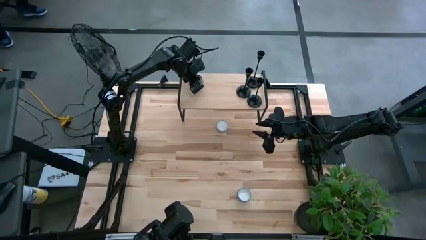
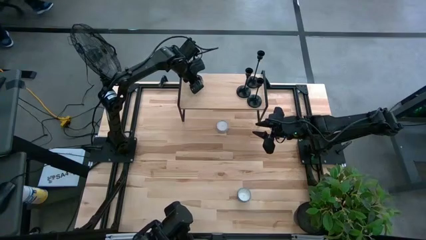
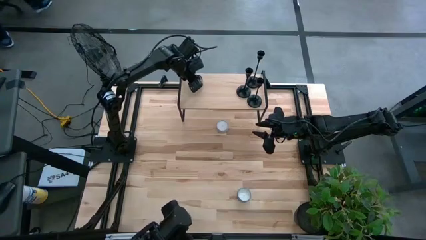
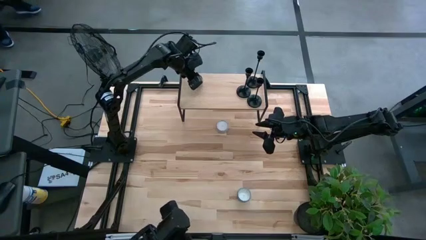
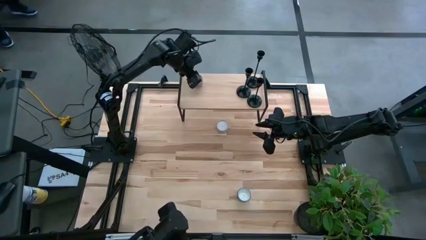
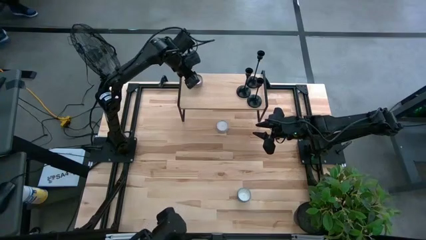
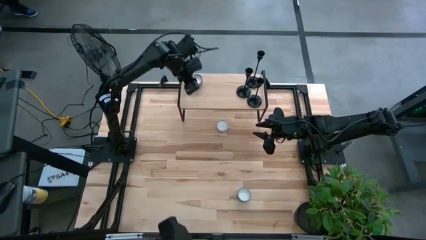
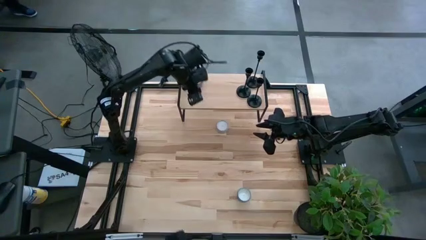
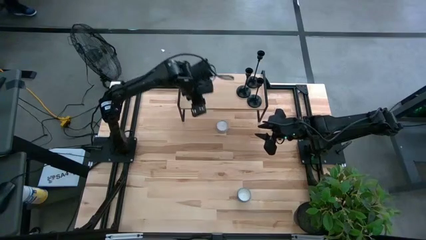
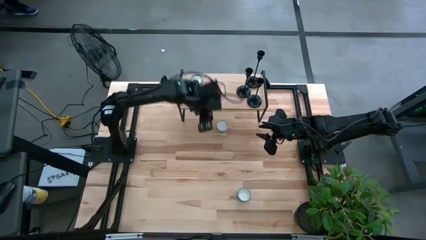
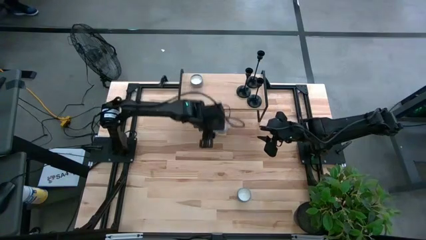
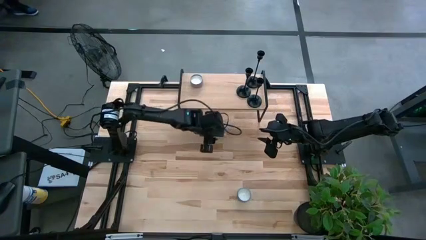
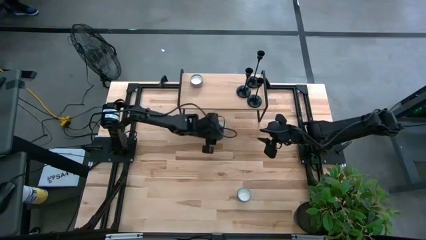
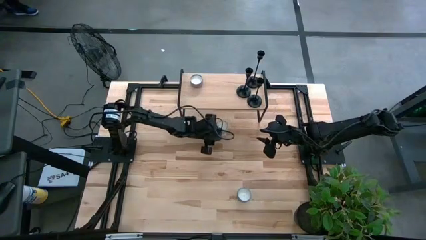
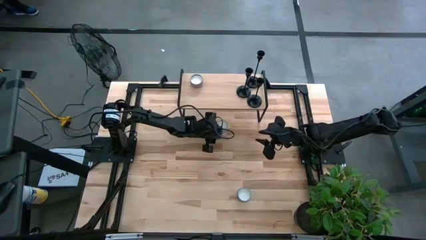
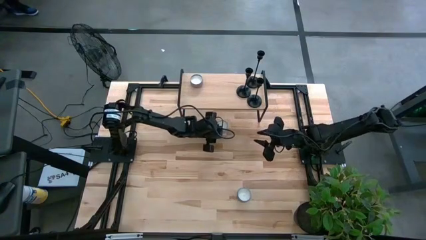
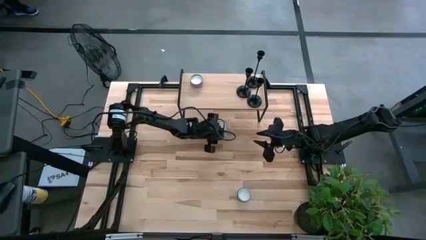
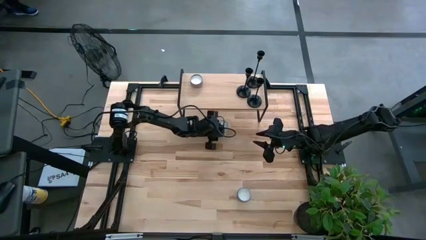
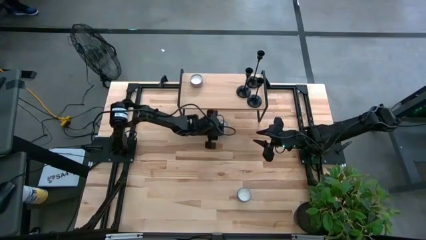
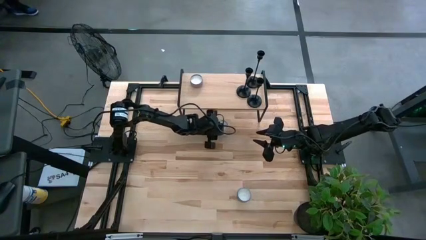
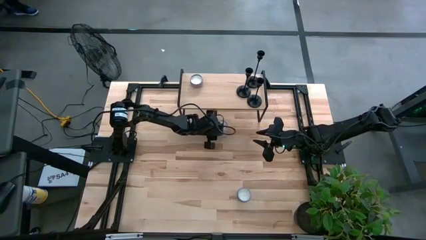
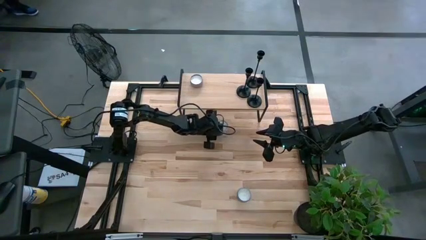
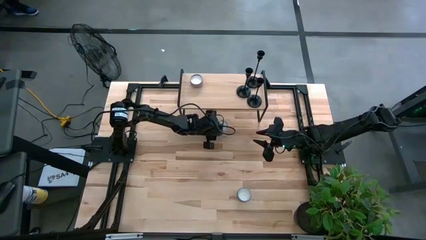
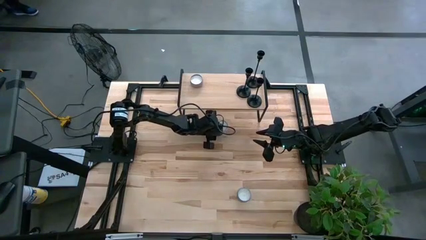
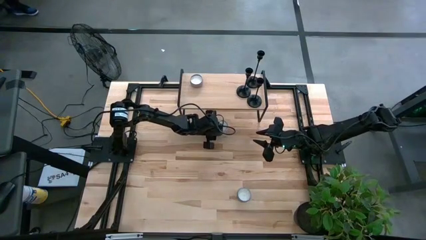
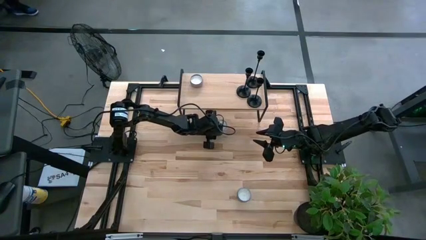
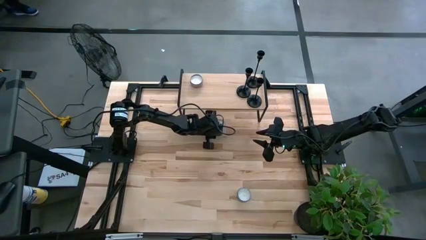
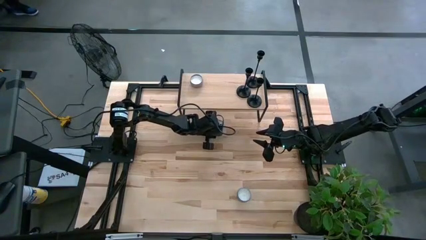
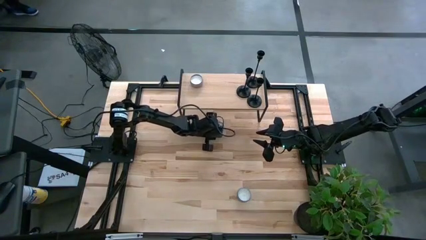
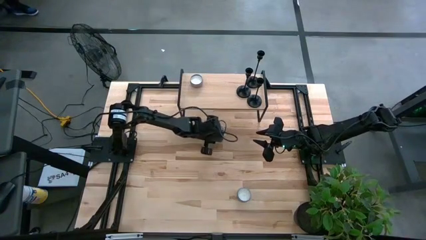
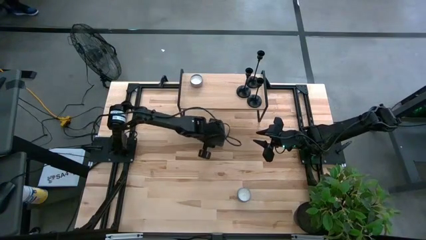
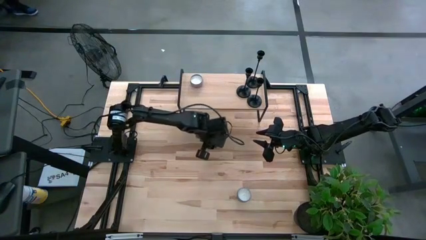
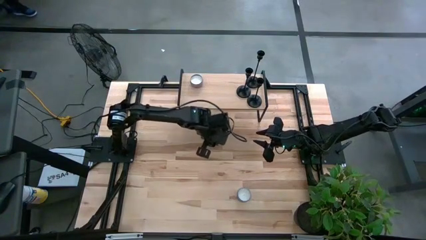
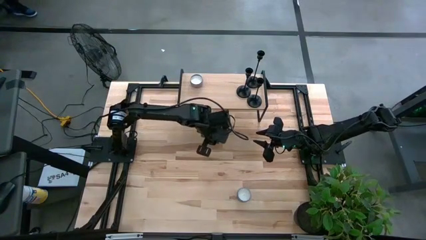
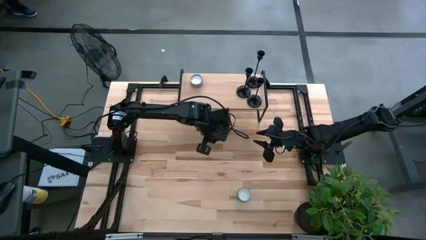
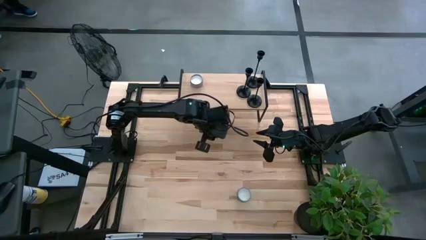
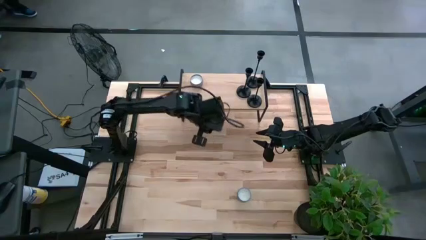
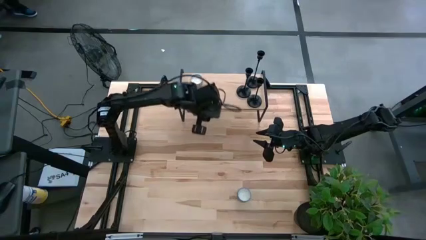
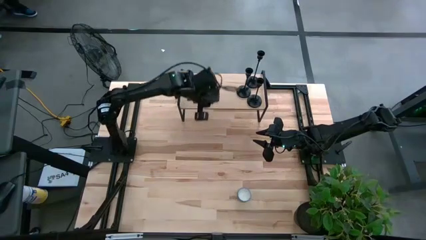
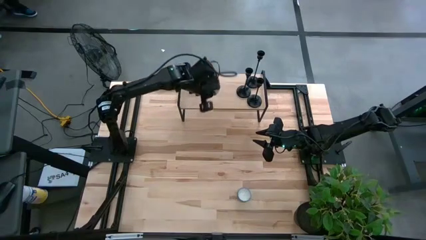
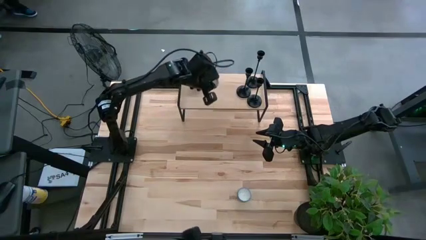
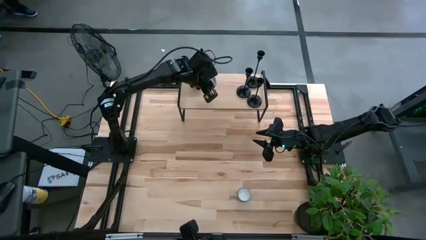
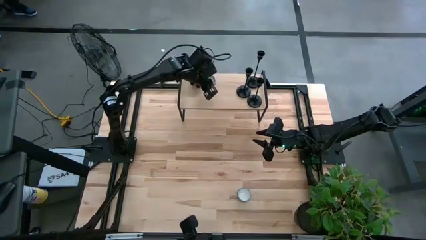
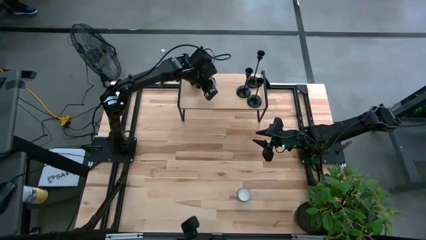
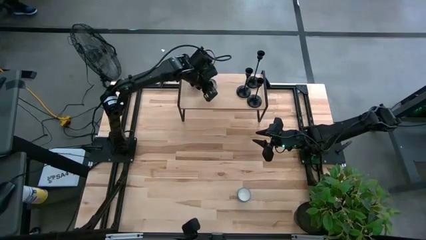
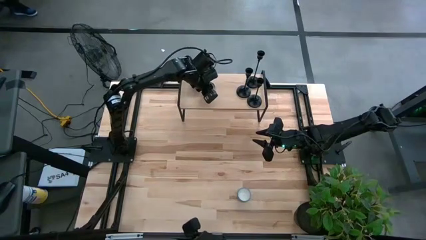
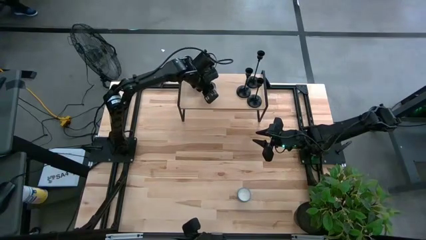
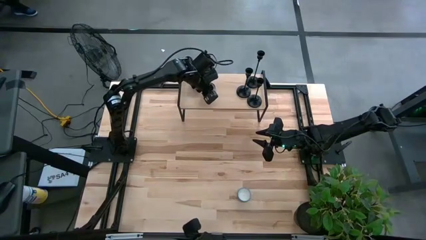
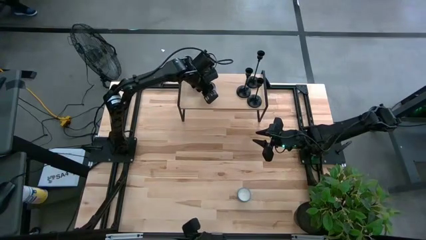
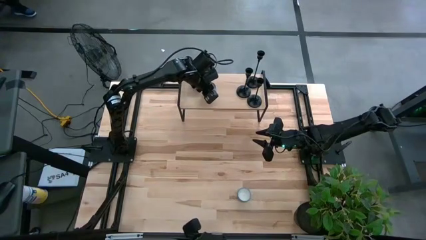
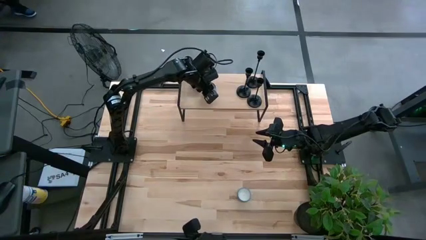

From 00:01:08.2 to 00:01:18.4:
Task: Pick & Place candle stick holders
Put the red scented candle on the shelf

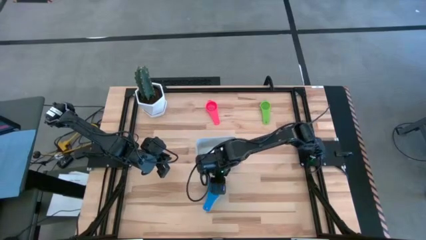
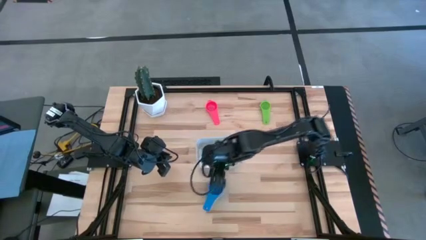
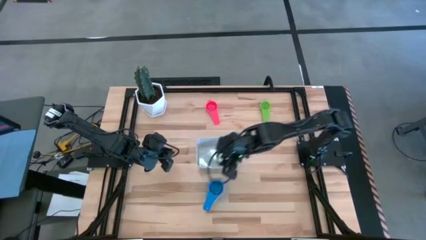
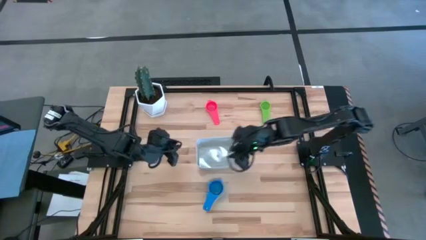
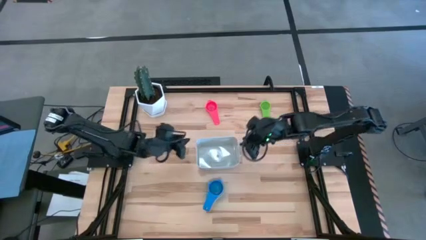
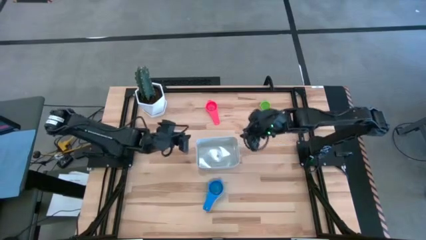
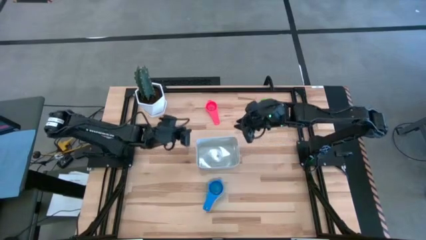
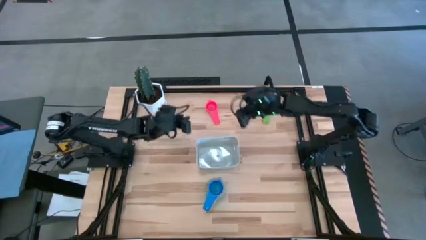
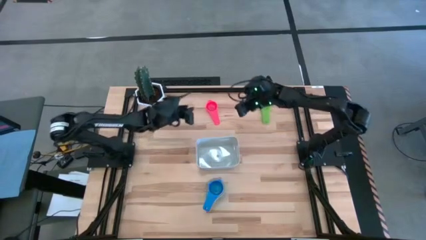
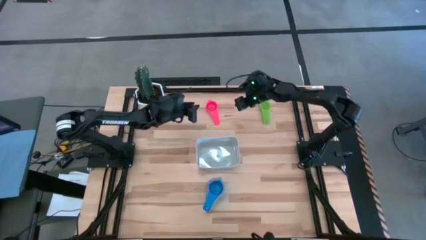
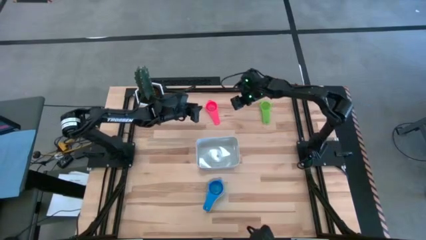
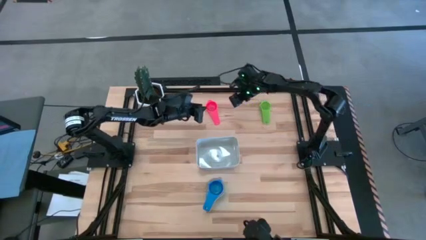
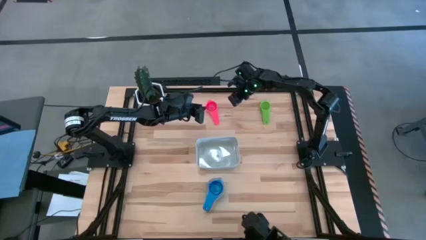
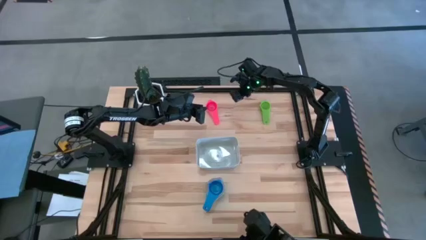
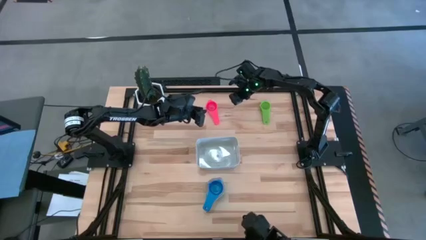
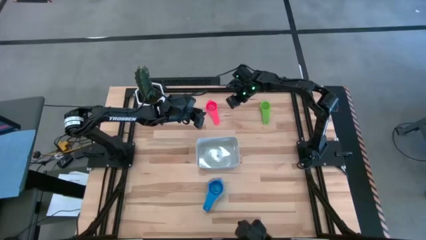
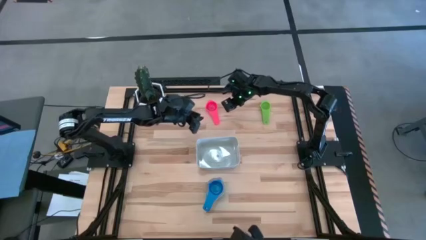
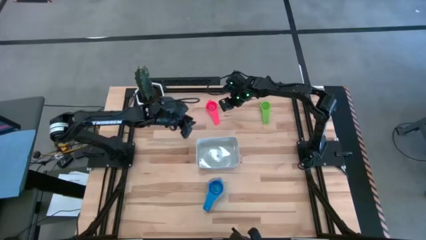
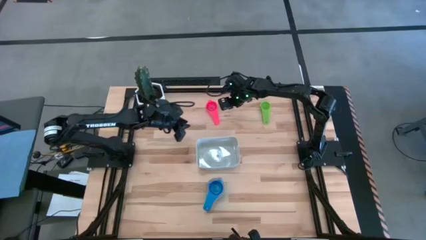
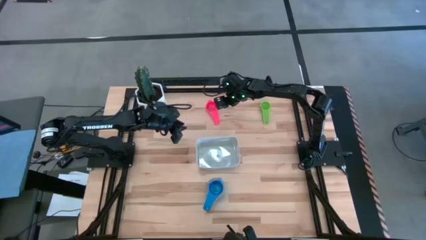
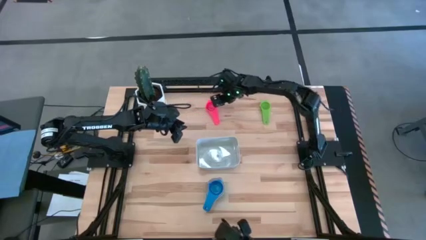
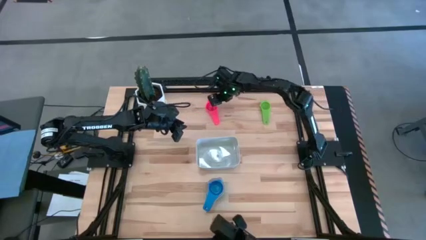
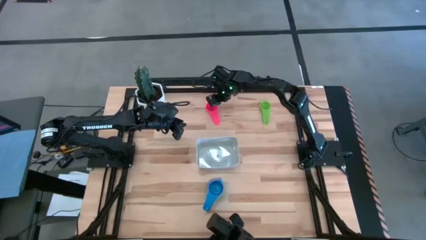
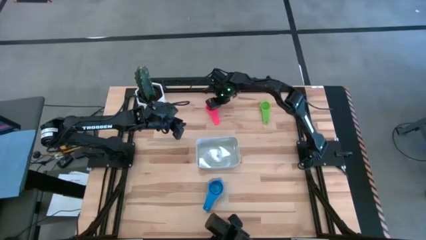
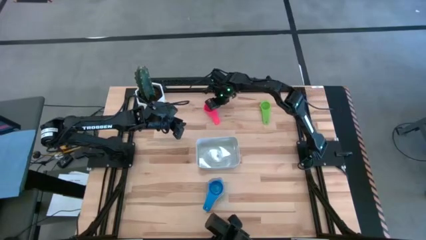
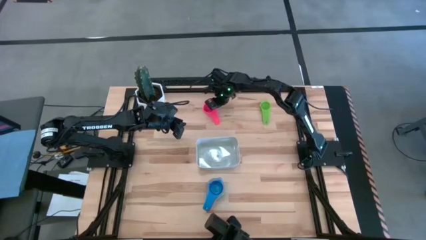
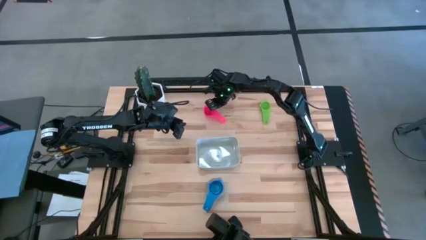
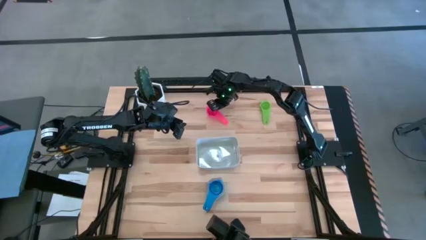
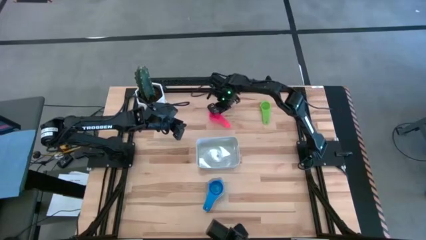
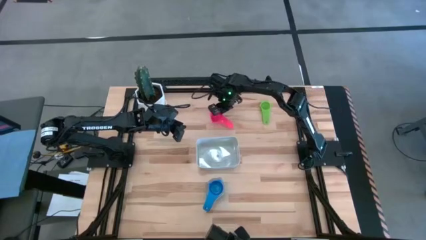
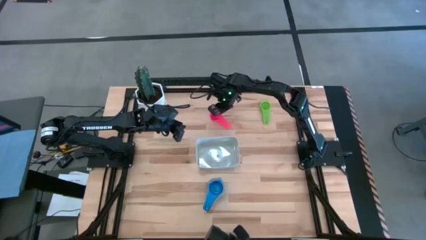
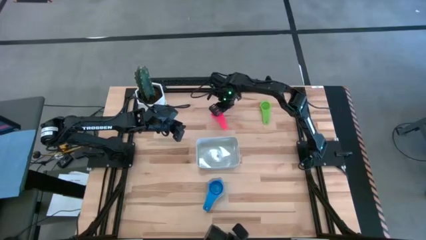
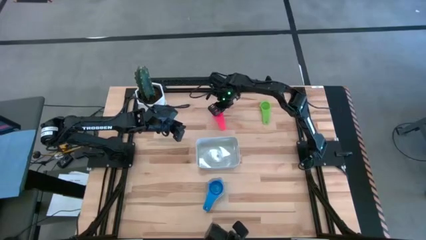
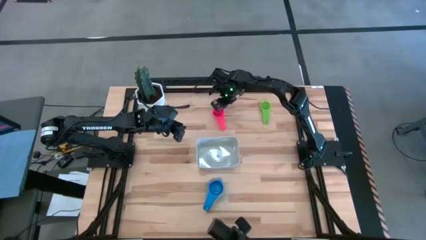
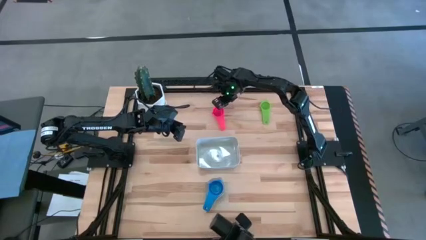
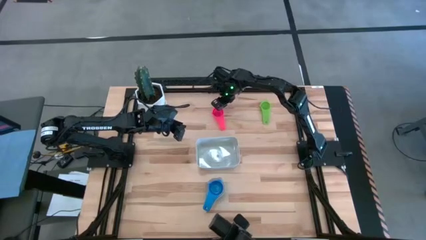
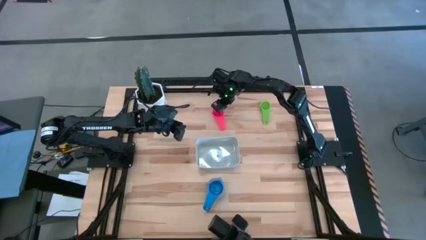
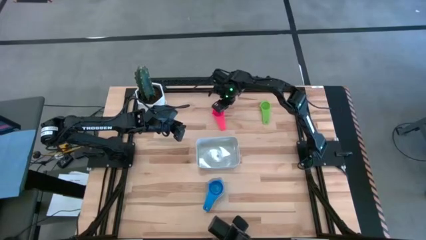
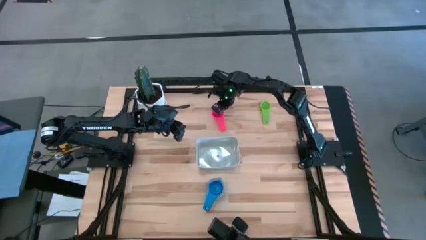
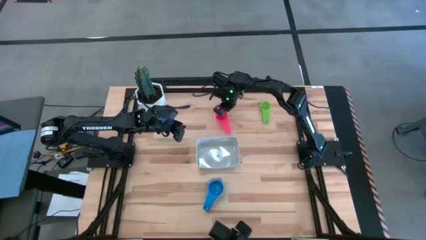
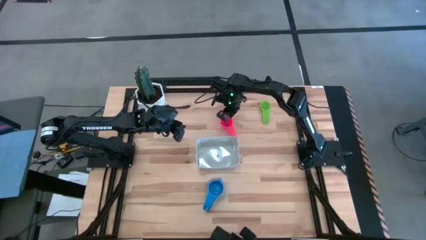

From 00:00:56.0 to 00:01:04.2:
Task: Nest measuring cups in basket
Stack the red measuring cup on top of the blue measuring cup
